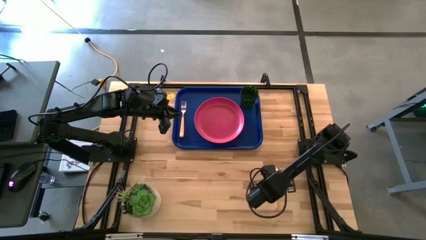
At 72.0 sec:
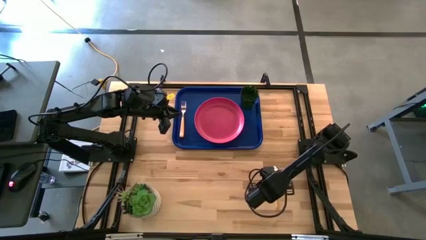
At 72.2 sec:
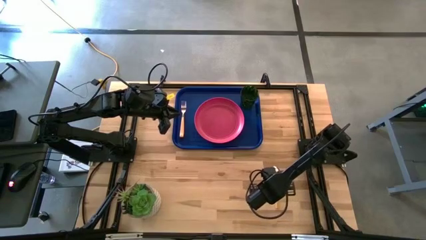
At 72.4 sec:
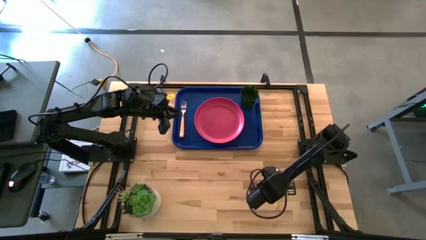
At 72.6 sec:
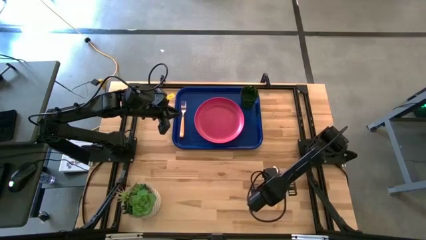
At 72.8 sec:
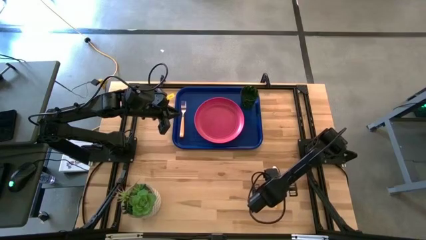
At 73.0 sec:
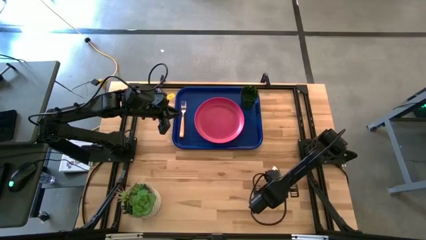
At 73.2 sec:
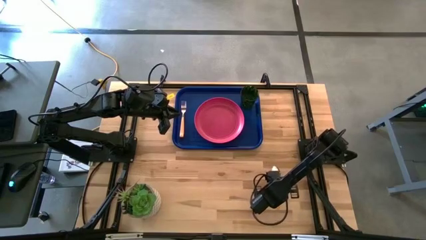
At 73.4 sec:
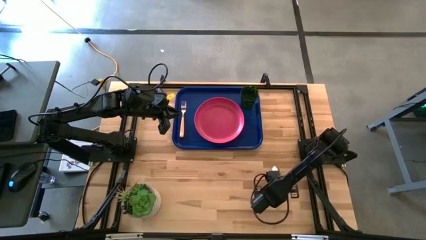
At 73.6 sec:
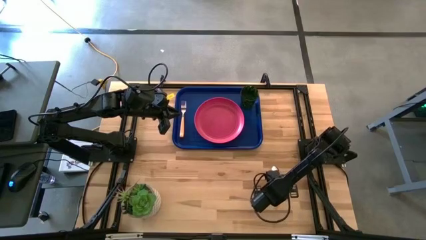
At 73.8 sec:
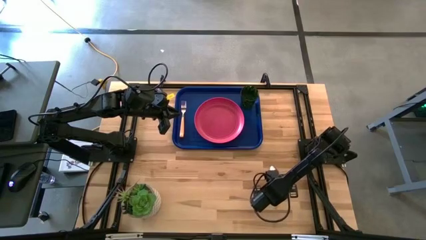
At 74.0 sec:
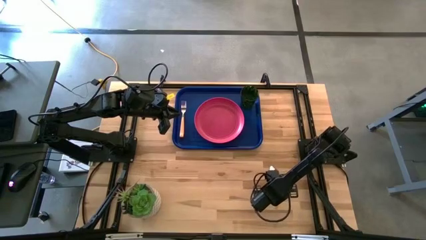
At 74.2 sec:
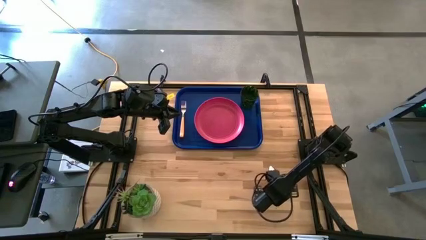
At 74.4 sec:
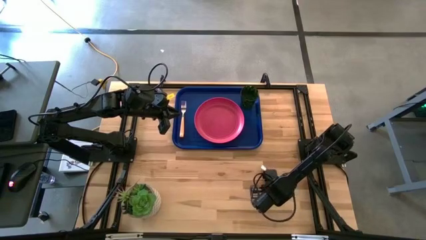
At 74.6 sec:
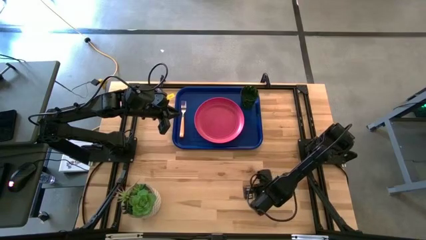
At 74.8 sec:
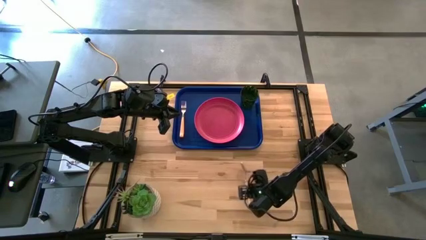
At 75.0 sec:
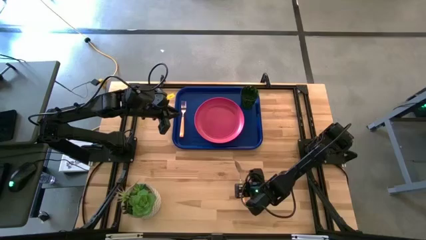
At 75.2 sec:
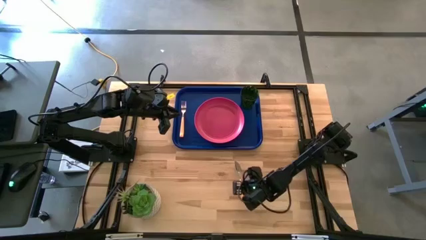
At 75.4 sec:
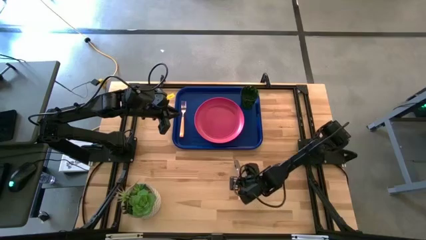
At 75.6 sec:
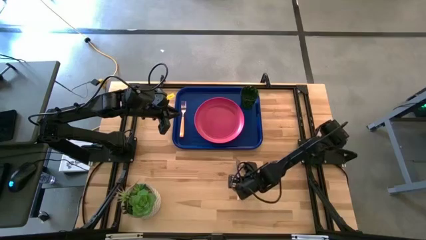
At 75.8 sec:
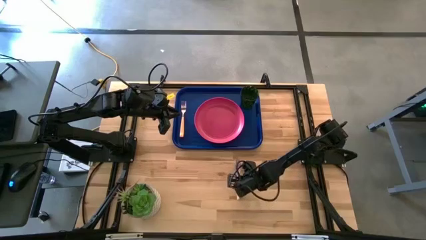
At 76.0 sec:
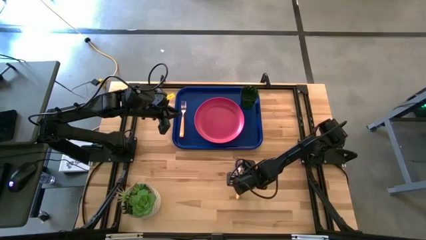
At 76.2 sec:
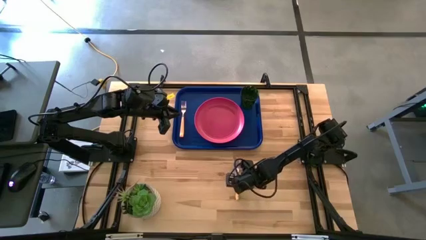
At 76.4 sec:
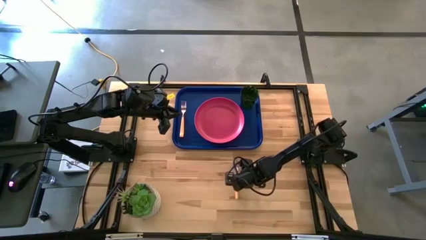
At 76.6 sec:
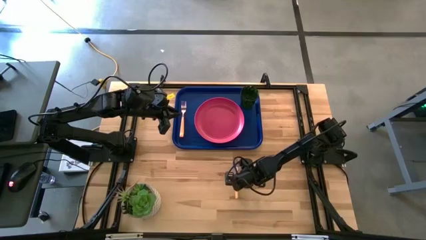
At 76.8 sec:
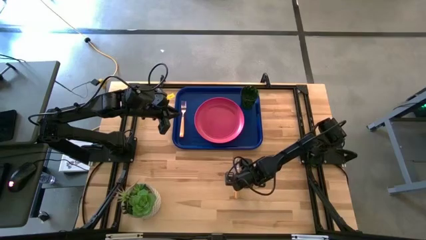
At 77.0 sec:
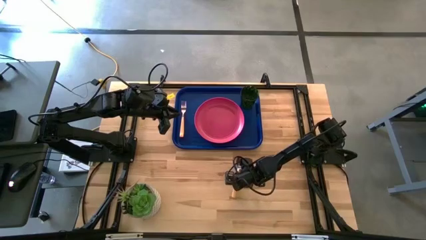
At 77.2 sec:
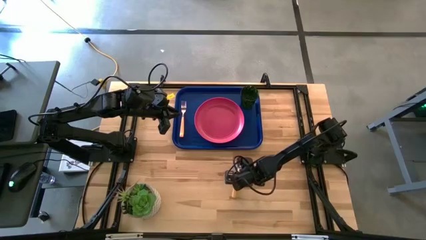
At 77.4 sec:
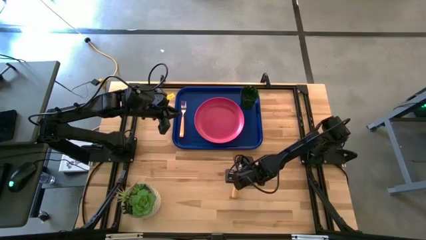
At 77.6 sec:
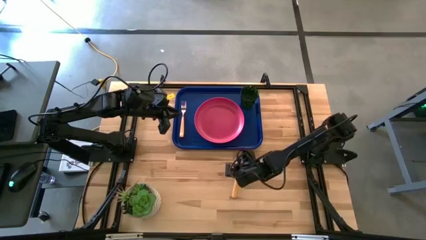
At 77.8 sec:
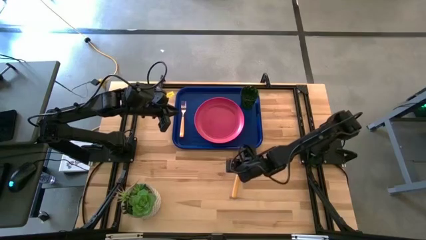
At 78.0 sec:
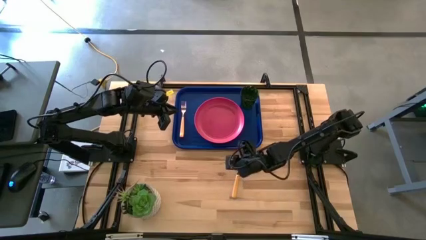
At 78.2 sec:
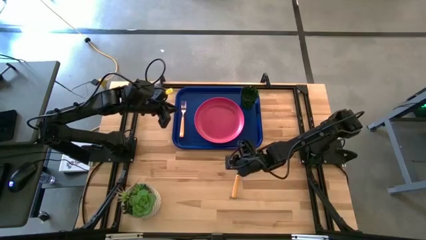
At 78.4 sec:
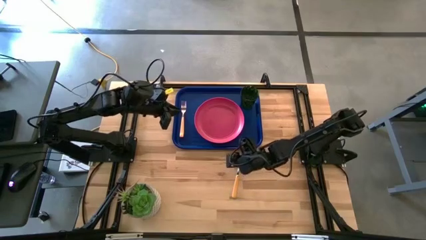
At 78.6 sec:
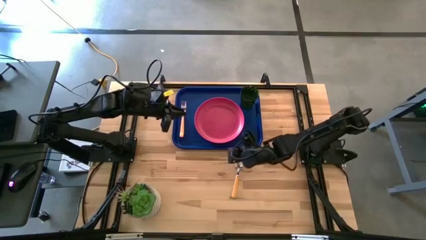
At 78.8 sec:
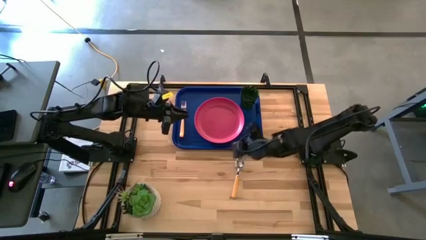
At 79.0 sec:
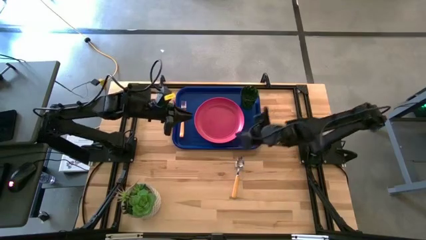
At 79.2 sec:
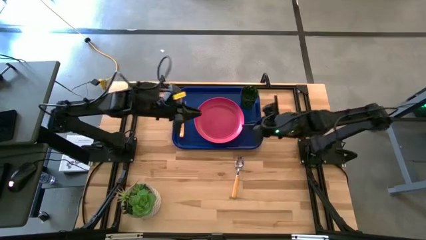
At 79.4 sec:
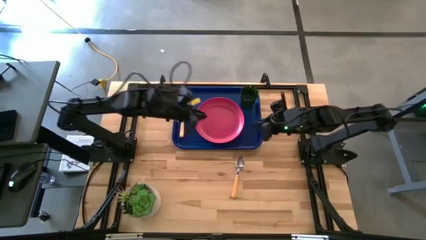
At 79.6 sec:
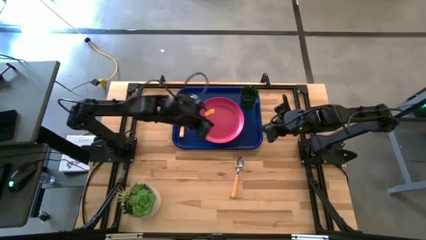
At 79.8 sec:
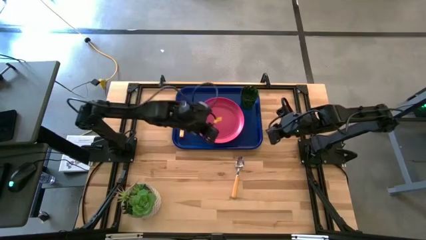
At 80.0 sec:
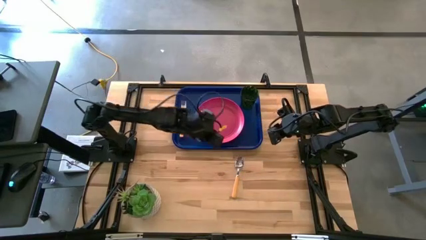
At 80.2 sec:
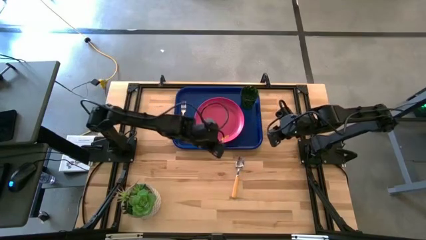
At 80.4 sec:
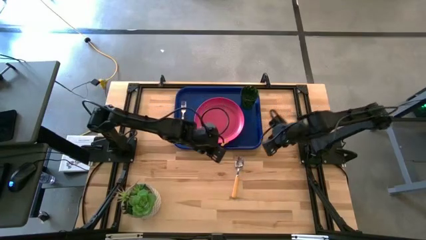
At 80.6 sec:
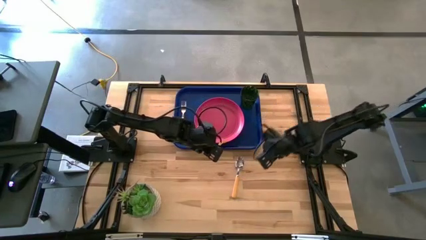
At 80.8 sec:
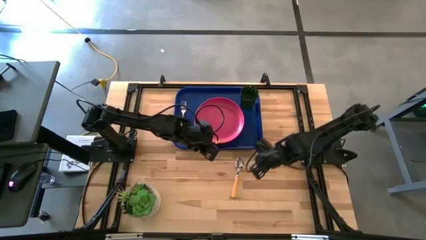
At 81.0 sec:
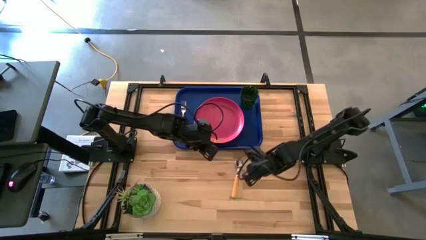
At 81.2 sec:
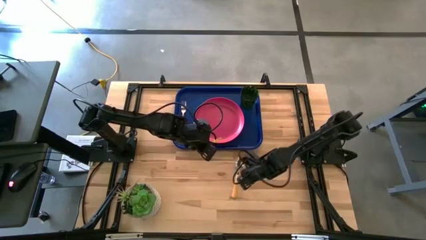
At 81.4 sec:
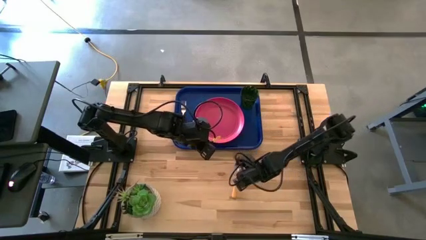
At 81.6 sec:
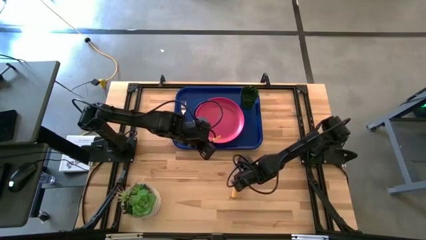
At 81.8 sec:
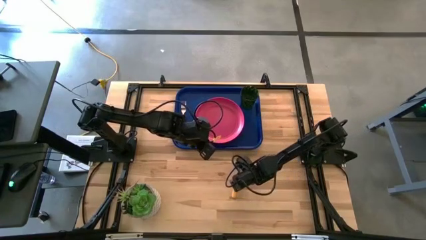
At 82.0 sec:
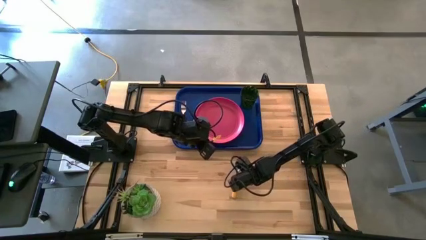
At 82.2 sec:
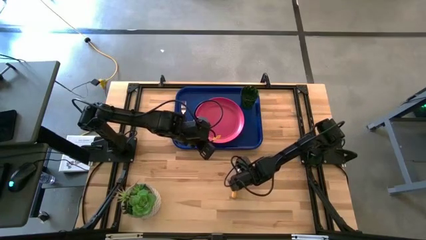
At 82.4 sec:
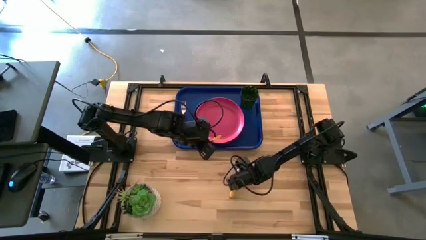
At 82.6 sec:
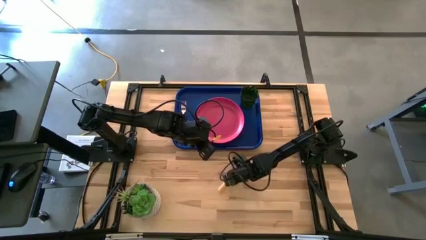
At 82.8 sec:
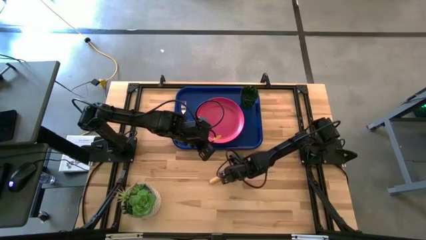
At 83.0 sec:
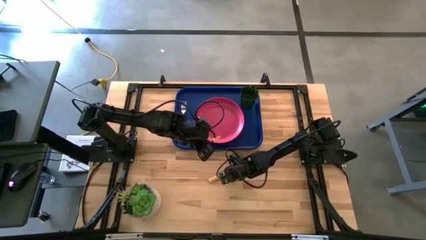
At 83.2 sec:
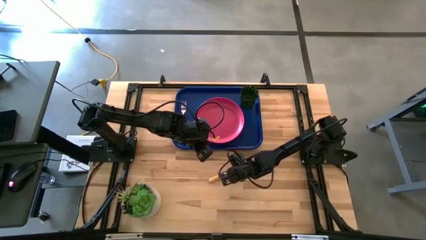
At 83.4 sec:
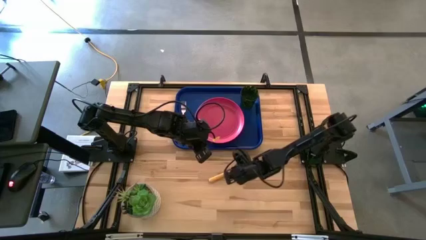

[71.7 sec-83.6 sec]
Task: Pick and place plate/cup/fork/spoon on tray
Put the yellow spoon between the fork and plate on the blue serving tray
